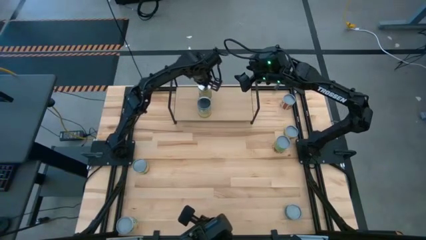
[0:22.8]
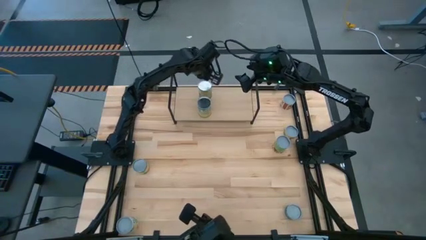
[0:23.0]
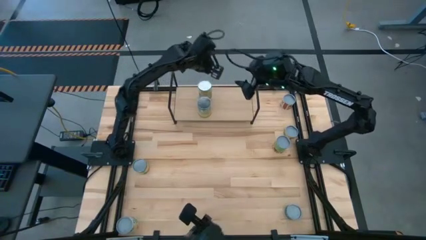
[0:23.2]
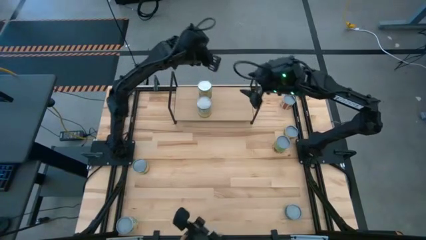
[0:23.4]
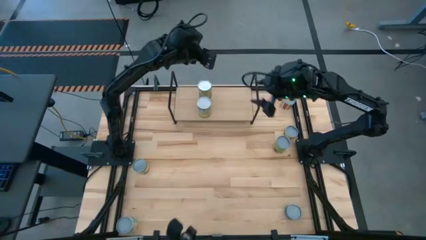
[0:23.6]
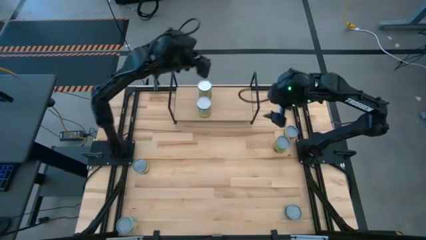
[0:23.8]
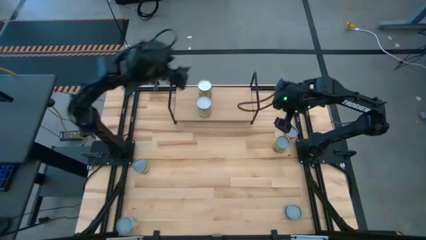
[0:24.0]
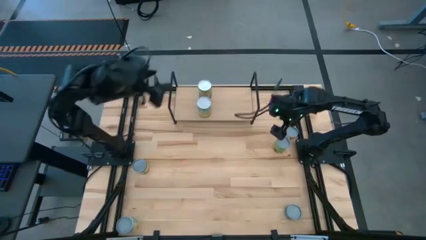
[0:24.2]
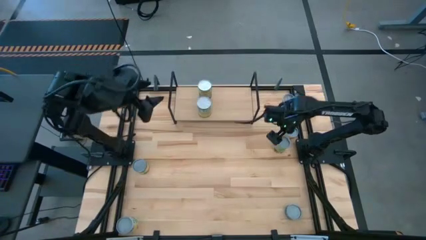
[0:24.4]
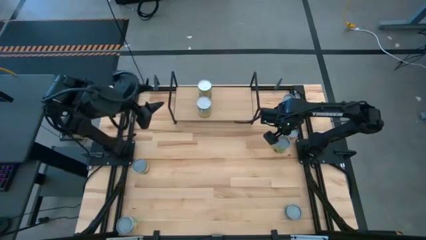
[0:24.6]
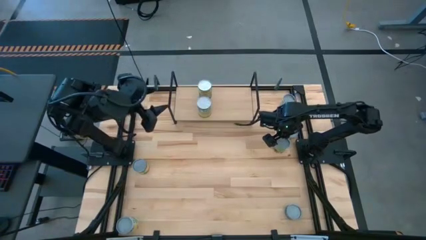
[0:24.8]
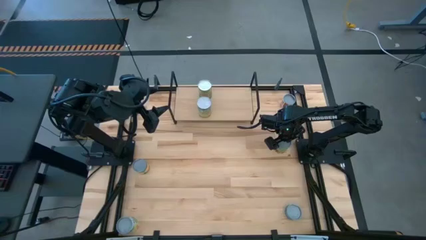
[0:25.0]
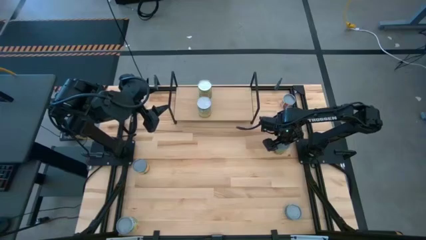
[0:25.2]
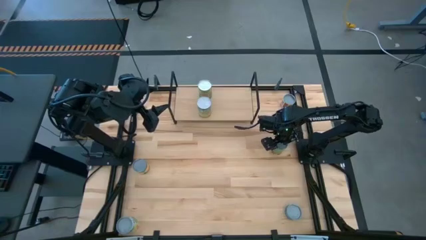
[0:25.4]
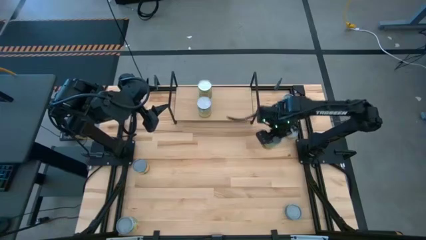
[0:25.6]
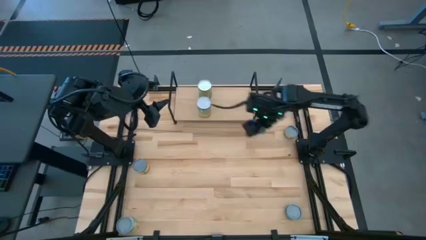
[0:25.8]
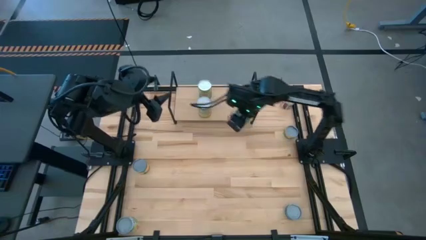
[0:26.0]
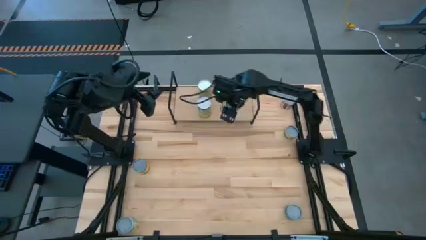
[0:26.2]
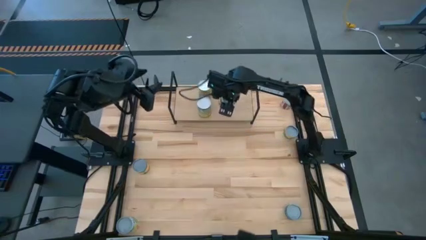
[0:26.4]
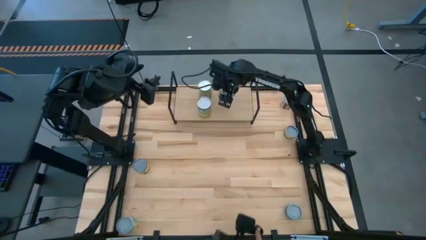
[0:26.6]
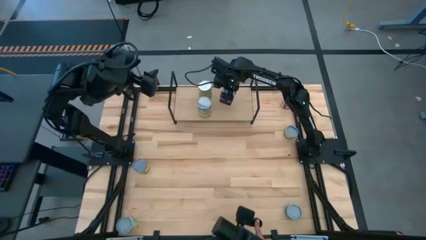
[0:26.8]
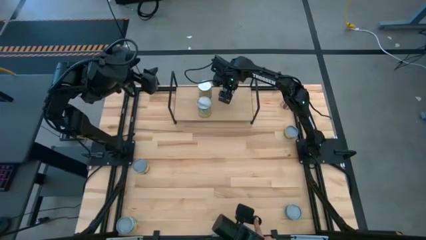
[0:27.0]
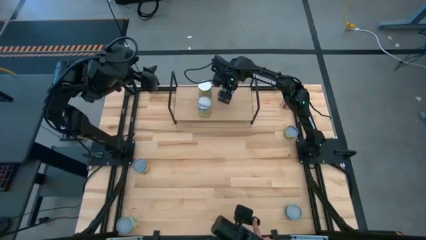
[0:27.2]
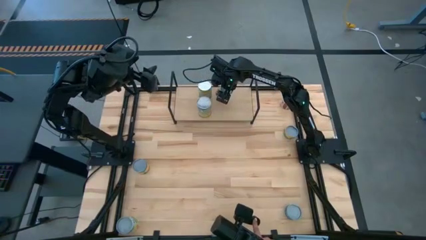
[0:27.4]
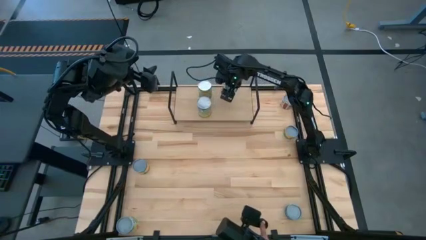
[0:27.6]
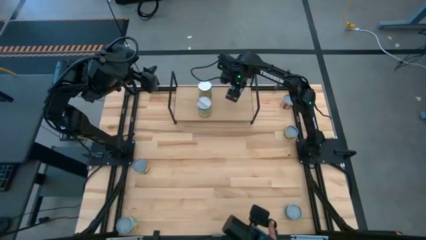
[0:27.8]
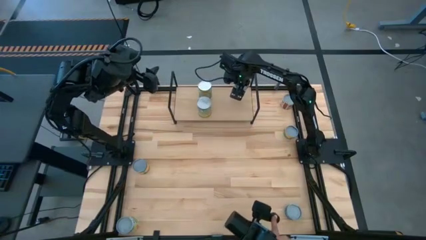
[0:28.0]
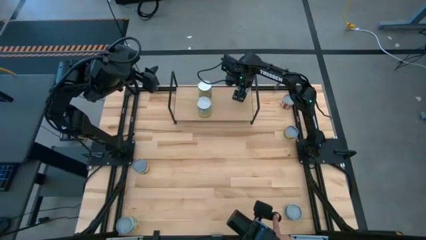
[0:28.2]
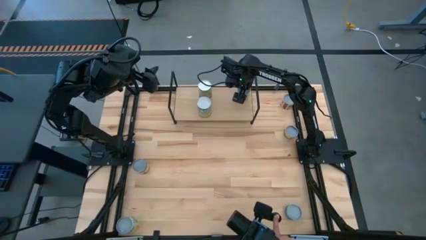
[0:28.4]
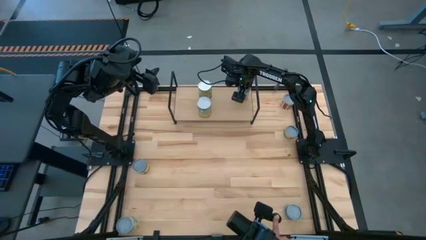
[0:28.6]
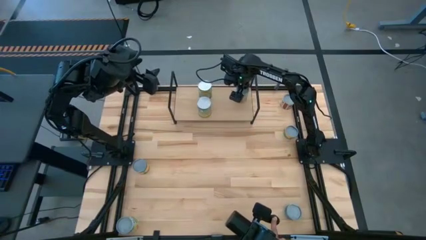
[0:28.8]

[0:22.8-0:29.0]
Task: Pick and place cans onto a shelf
Put the canned spaghetti on the shelf

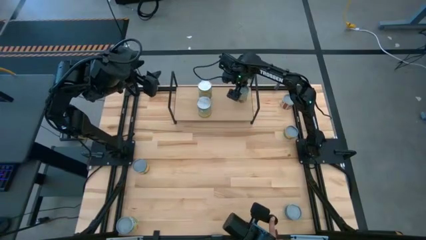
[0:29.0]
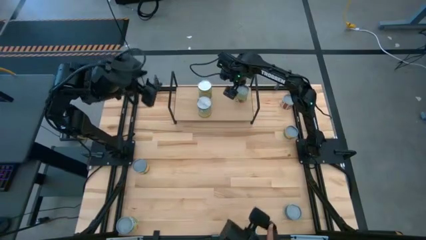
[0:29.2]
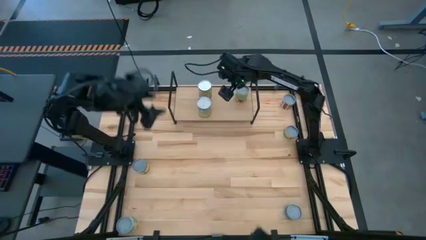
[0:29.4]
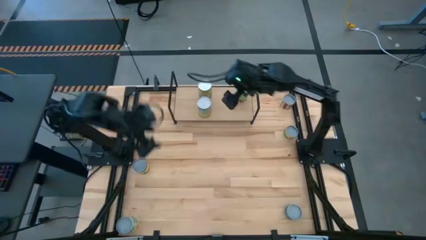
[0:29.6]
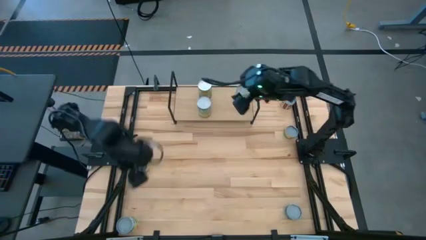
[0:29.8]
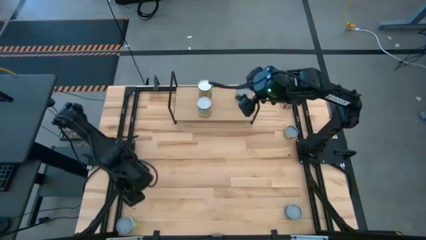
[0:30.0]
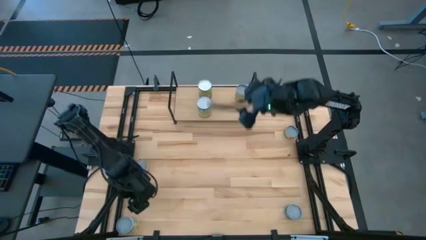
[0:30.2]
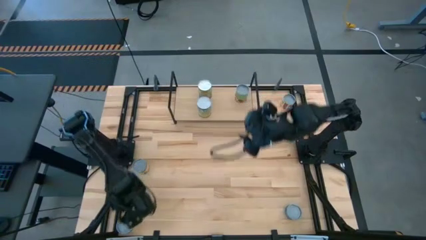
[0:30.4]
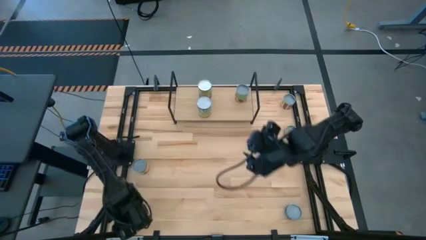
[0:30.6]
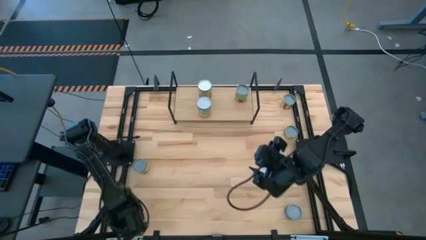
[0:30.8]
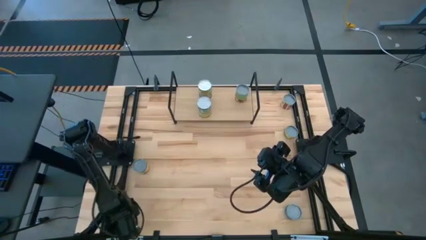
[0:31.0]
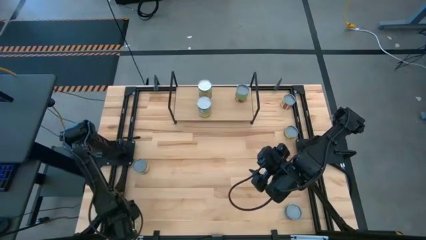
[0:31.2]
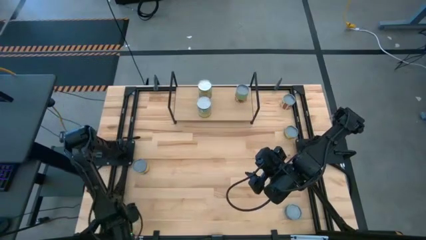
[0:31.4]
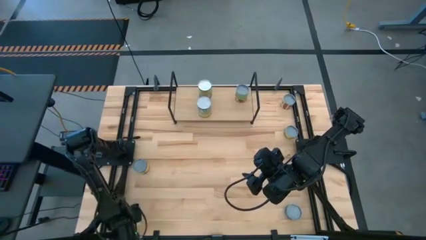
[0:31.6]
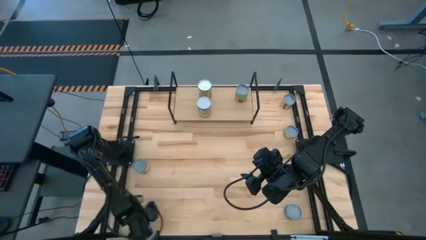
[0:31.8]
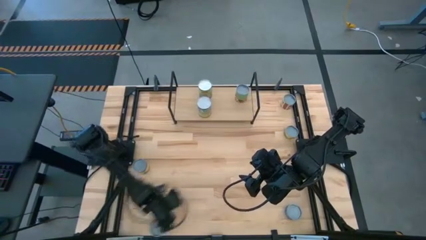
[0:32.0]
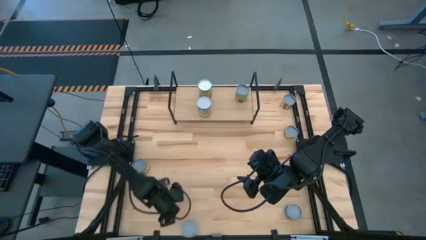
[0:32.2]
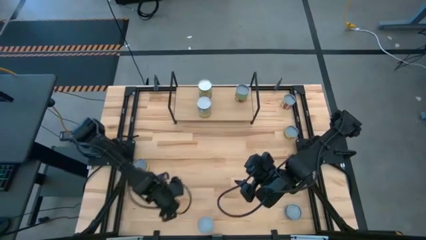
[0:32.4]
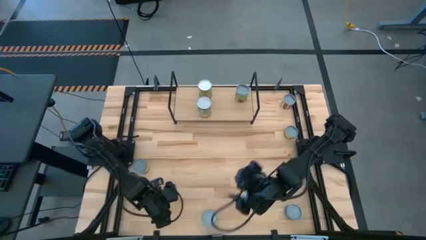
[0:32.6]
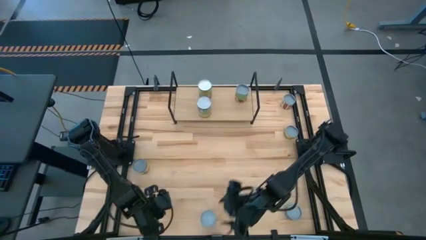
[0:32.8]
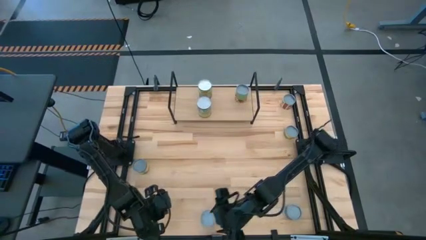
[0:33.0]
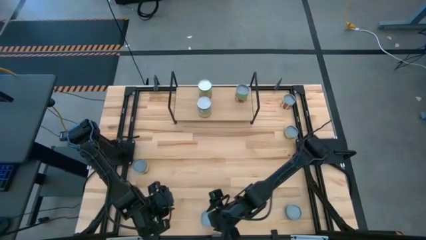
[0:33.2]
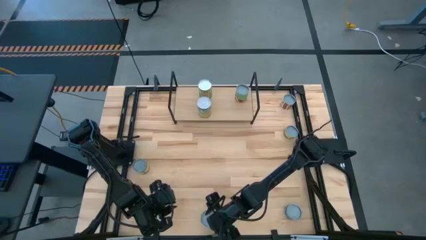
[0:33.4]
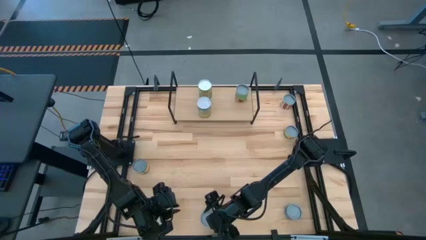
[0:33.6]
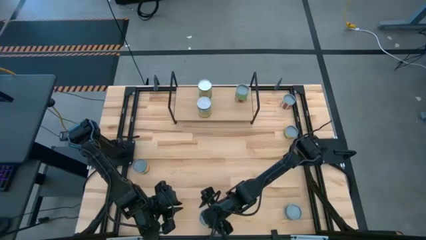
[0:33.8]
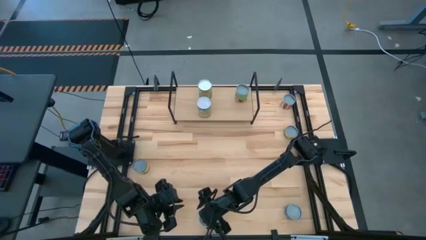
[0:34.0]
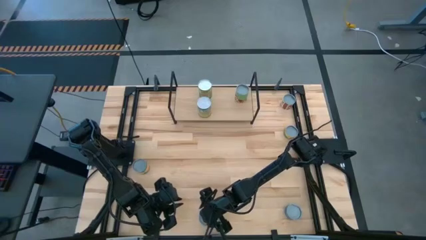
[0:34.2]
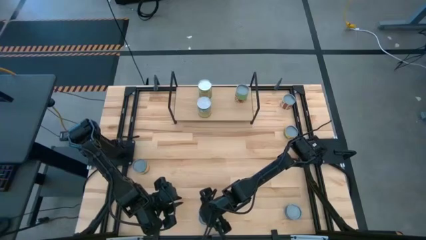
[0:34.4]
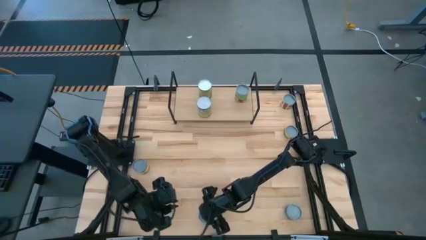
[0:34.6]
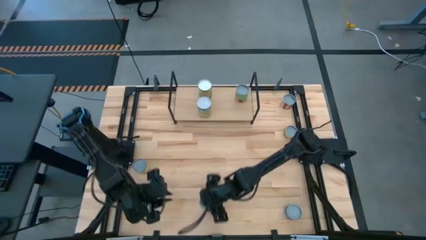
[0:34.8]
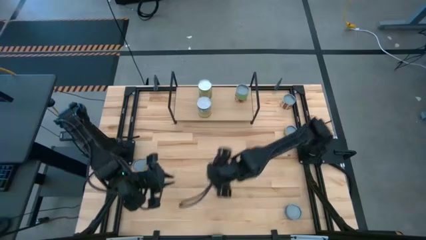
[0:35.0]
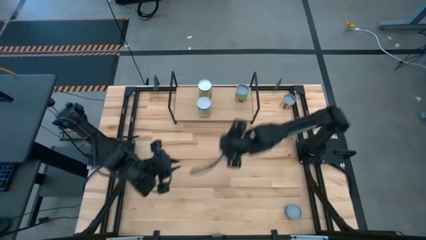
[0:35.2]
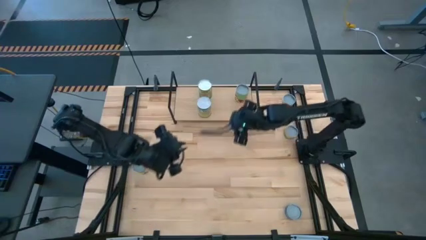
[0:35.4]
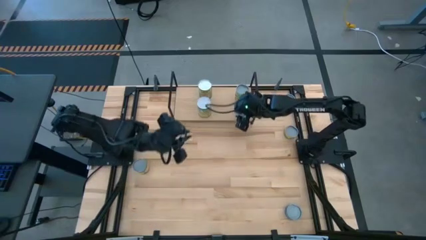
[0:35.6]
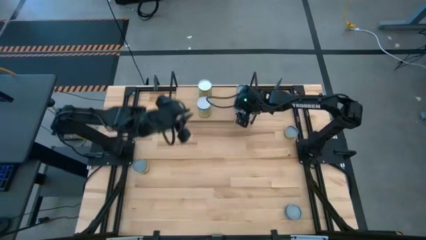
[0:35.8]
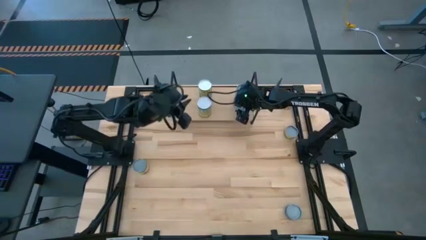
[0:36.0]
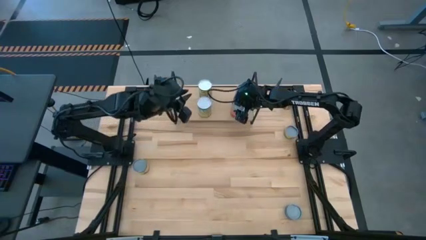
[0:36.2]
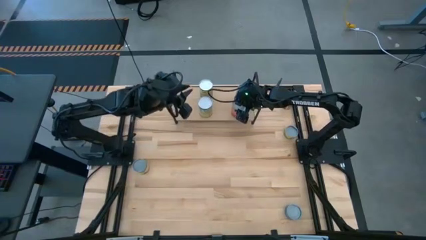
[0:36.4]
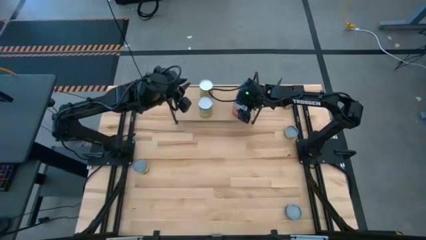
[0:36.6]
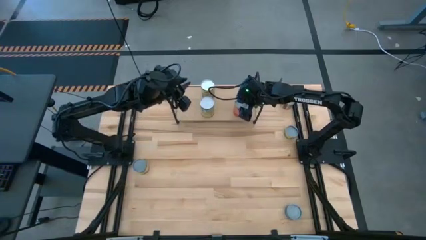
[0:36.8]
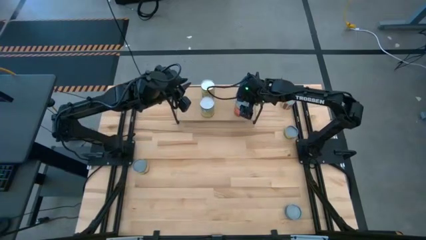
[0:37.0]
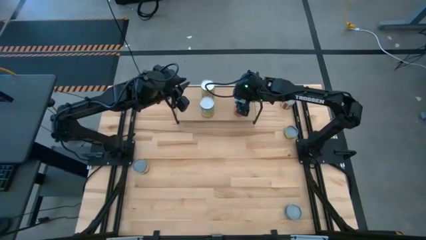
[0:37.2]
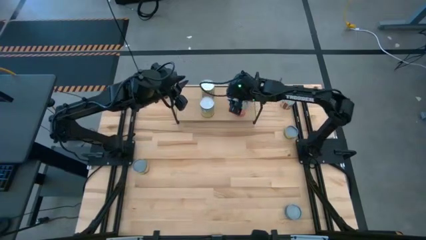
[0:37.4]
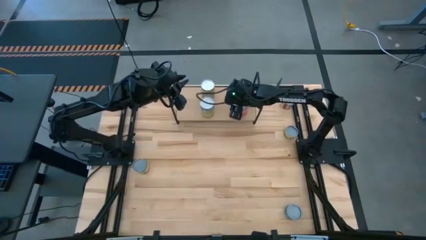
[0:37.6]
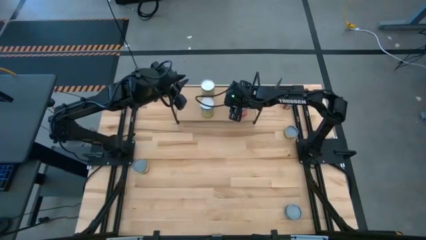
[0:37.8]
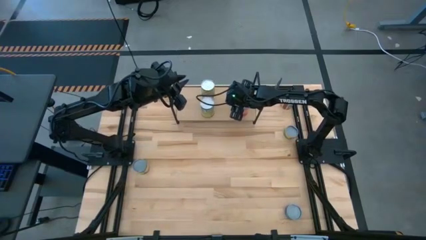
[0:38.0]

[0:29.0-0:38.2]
Put the canned mixed fruit on the shelf
